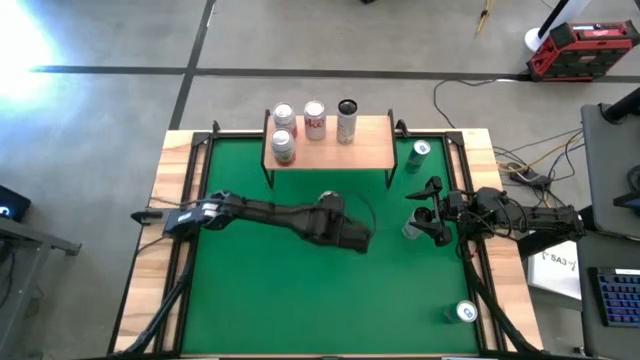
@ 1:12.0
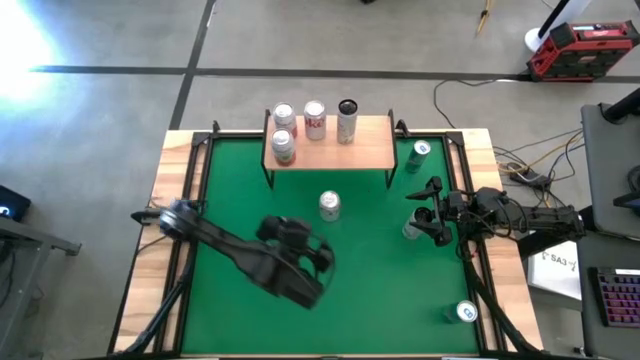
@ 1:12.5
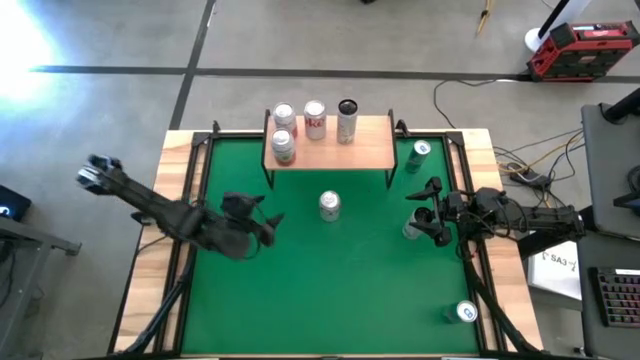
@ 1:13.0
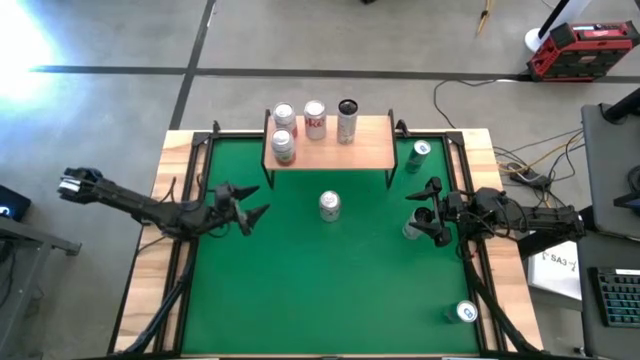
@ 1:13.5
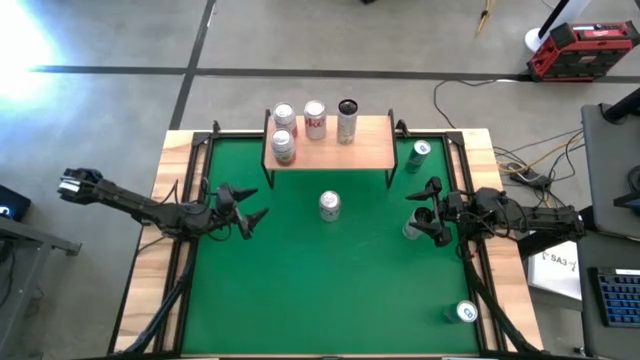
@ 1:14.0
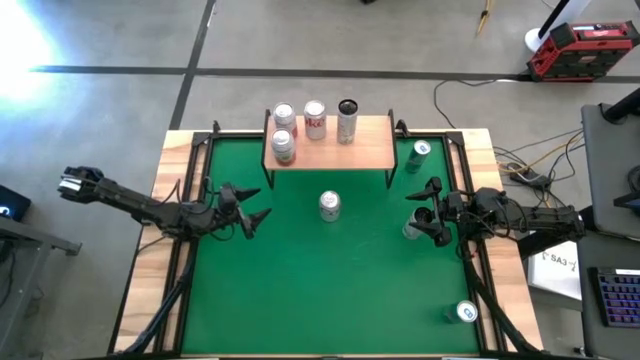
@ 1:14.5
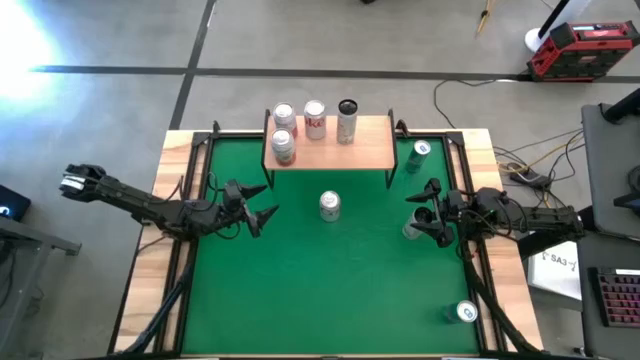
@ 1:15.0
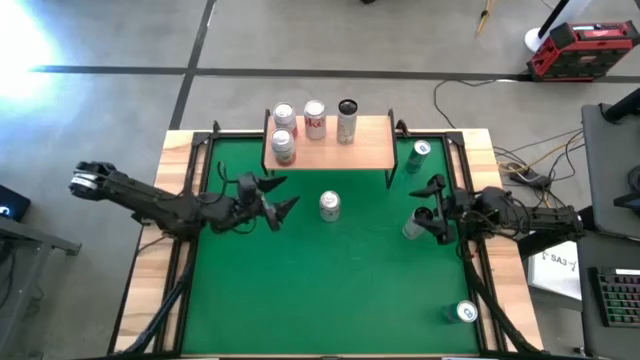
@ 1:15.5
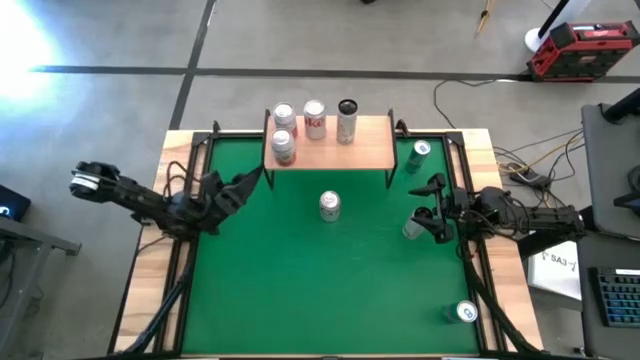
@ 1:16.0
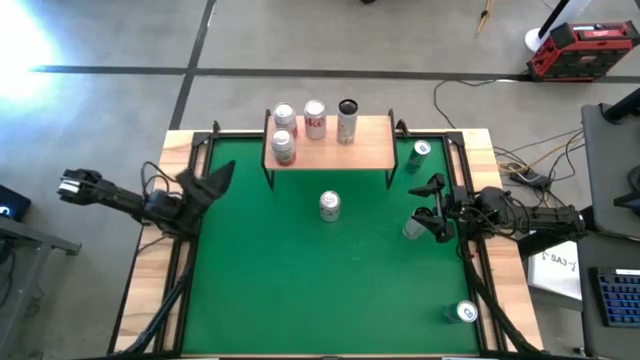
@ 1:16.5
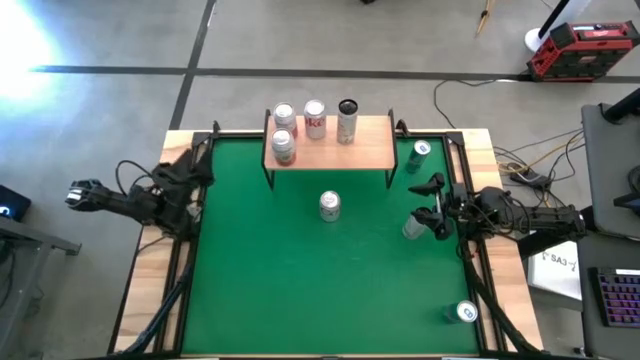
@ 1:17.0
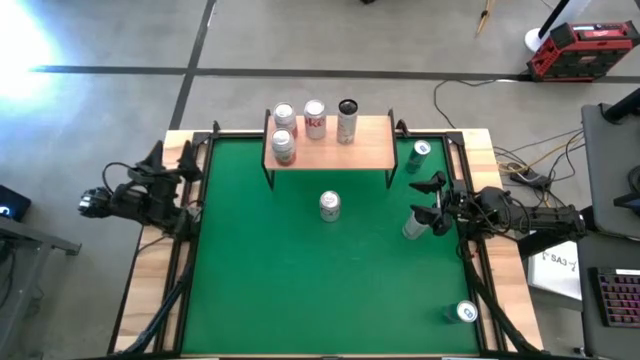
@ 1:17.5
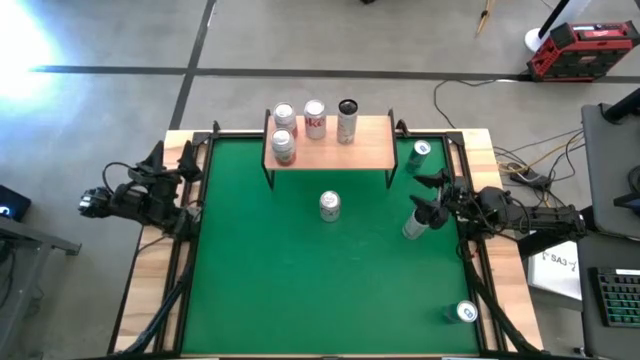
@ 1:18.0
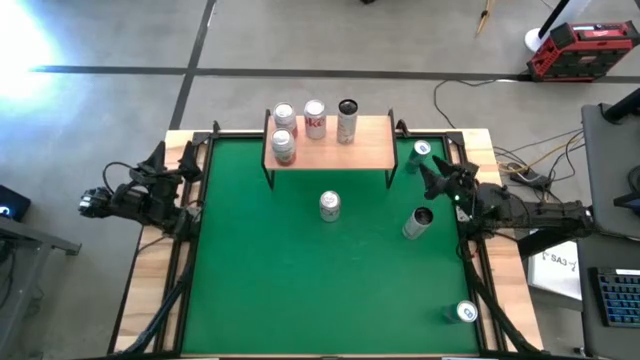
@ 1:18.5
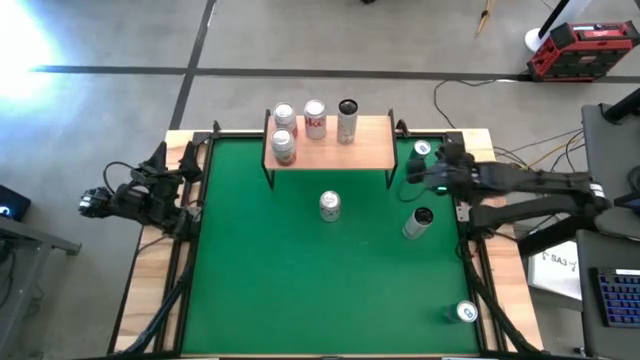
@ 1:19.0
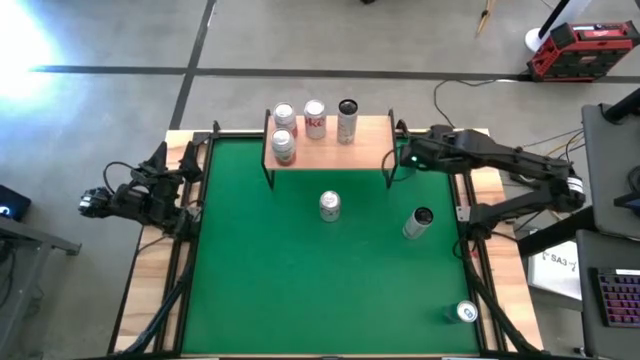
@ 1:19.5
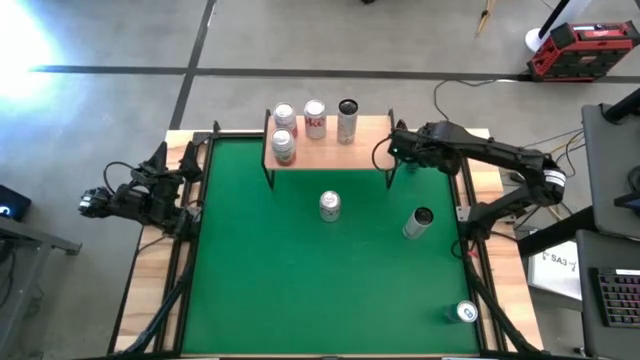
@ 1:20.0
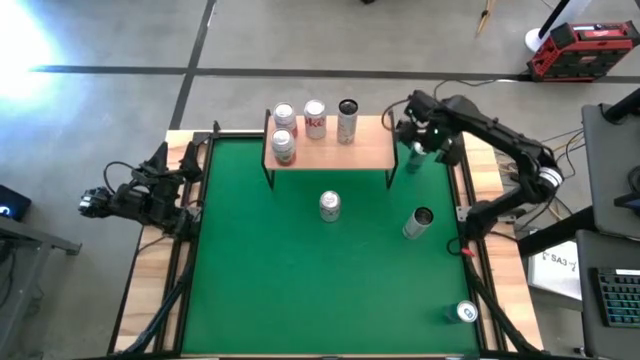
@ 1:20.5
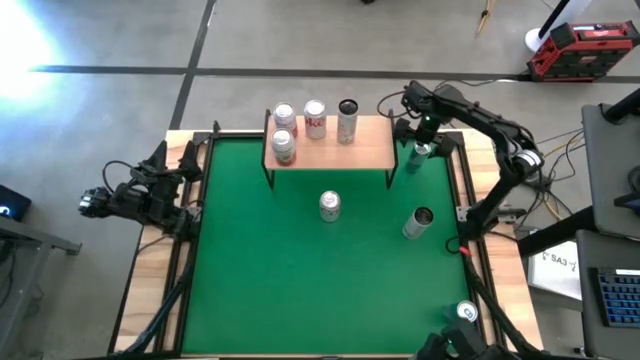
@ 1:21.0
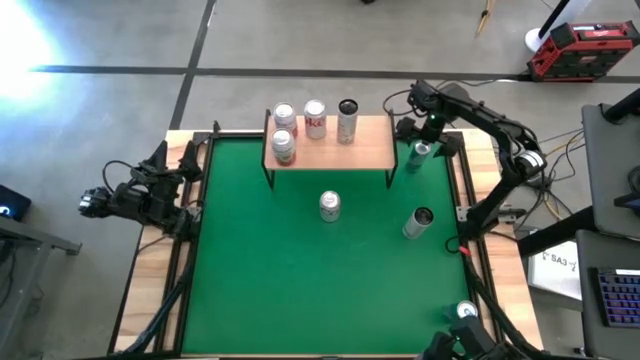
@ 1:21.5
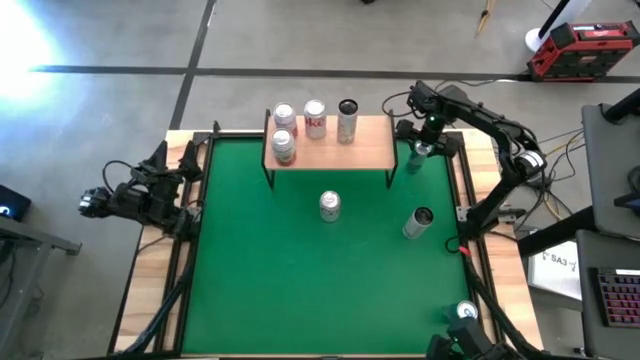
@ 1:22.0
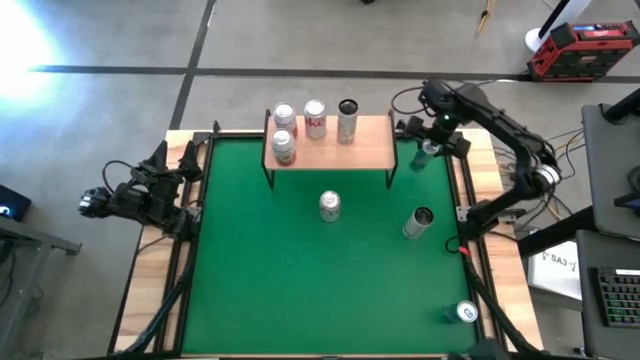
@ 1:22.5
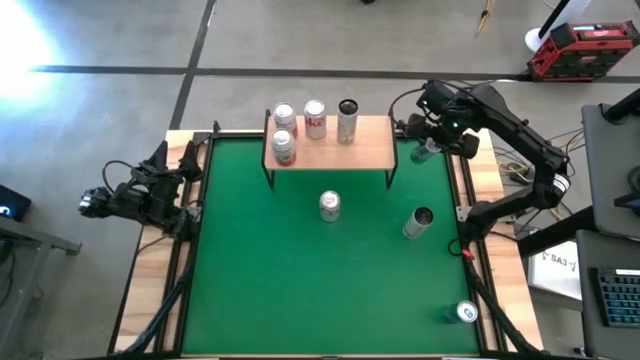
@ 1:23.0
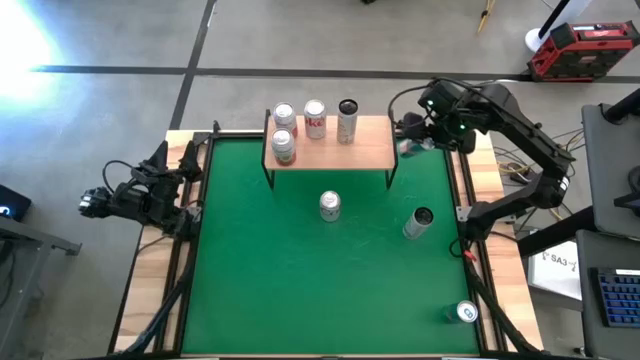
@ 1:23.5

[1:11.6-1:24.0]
Task: Place canned beverage on shelf
Put the top blue soda can on the shelf

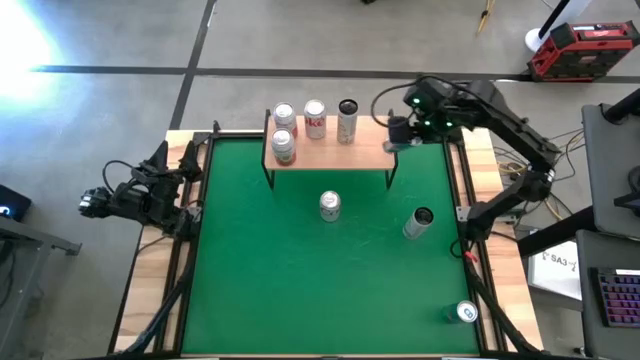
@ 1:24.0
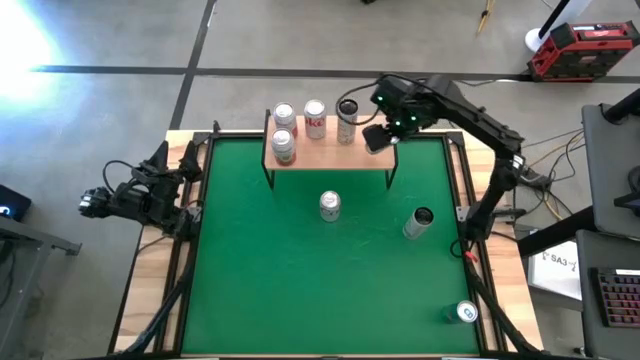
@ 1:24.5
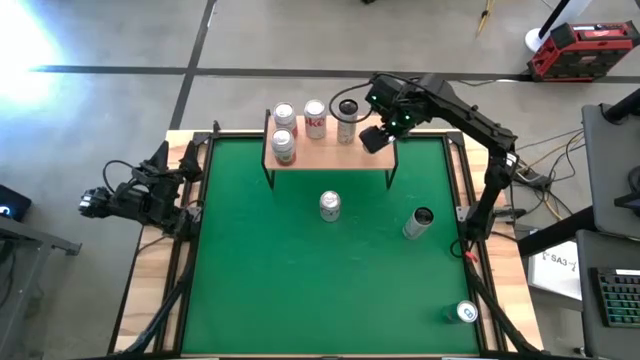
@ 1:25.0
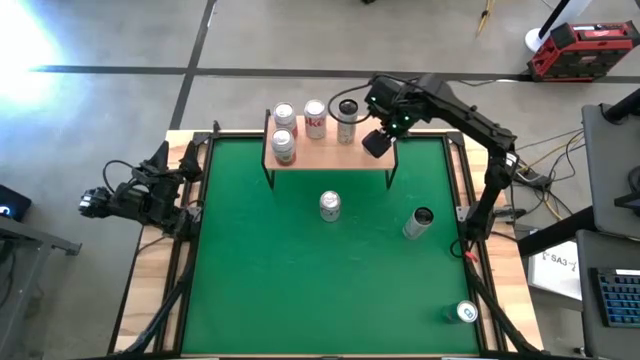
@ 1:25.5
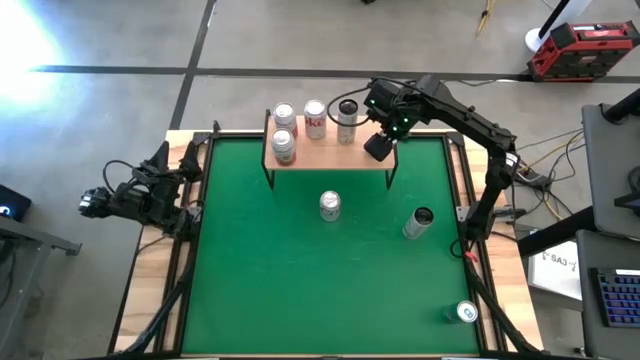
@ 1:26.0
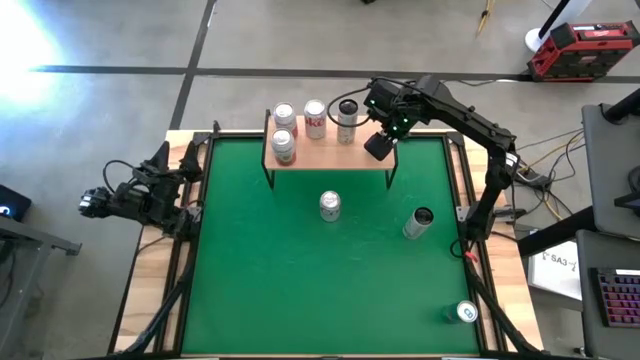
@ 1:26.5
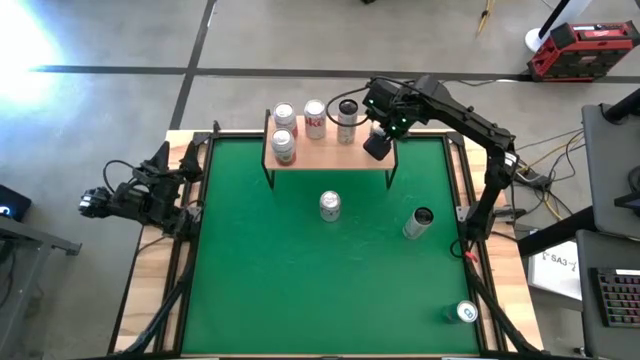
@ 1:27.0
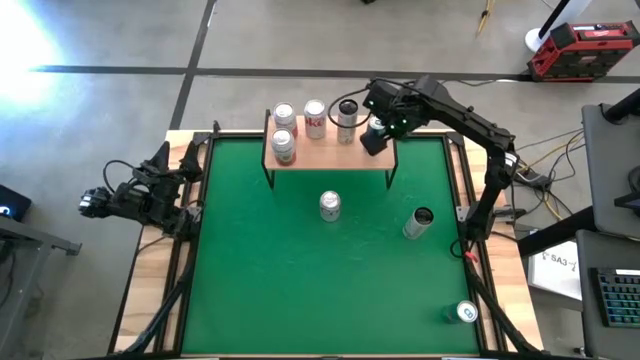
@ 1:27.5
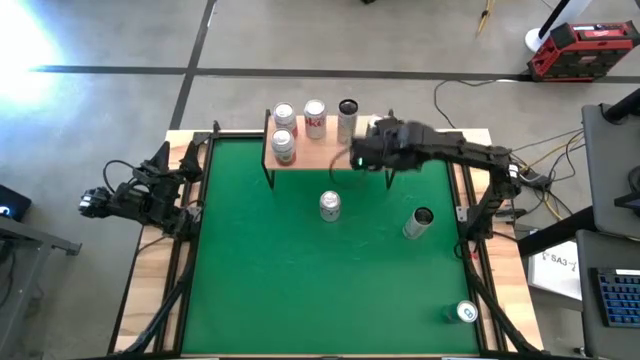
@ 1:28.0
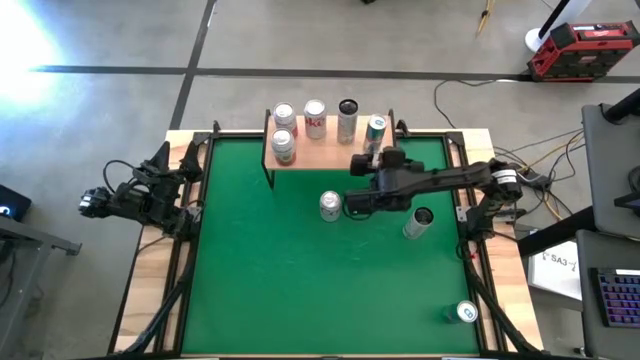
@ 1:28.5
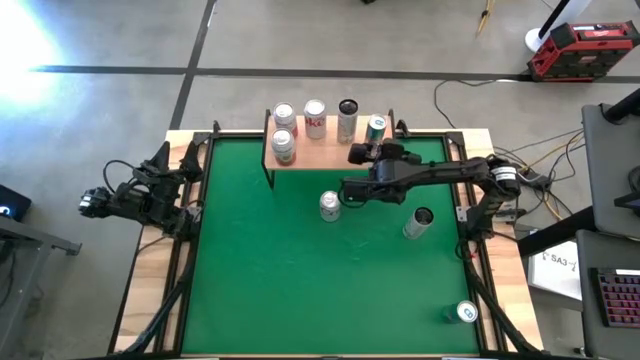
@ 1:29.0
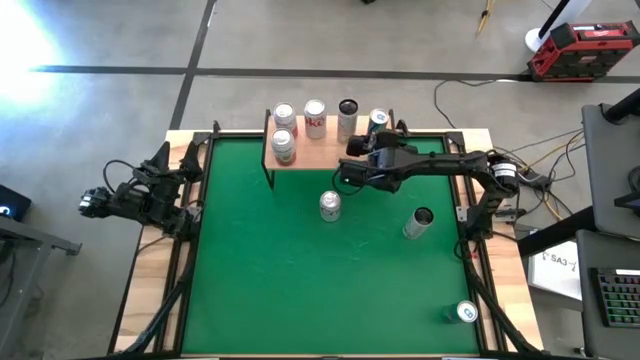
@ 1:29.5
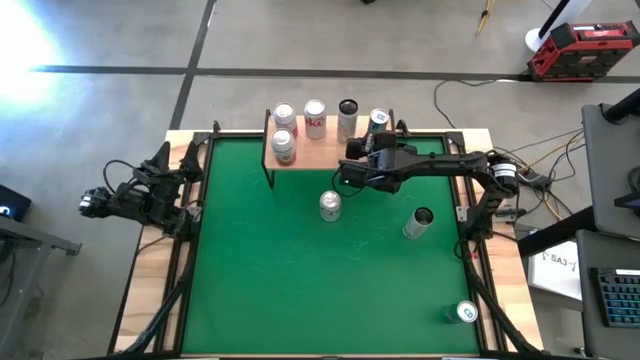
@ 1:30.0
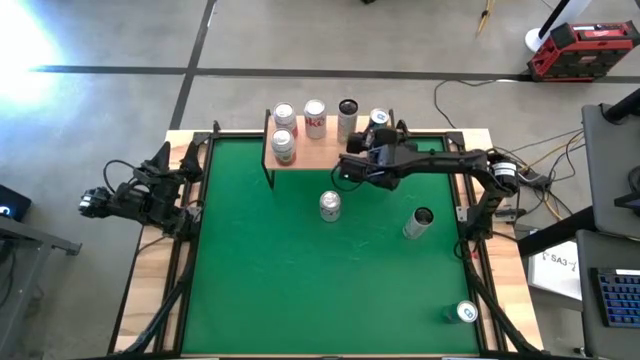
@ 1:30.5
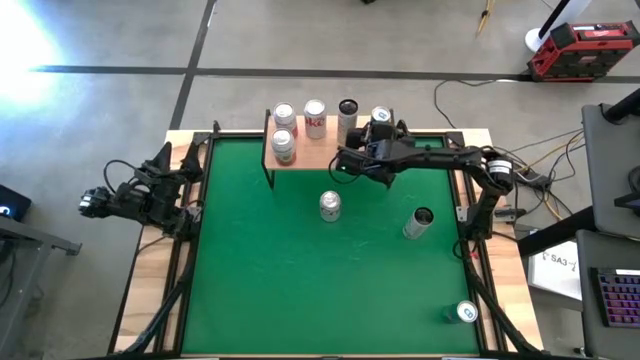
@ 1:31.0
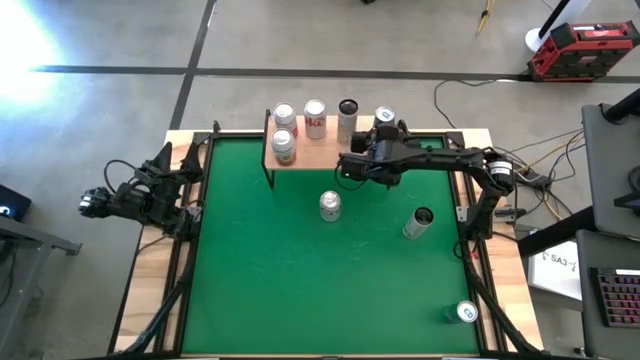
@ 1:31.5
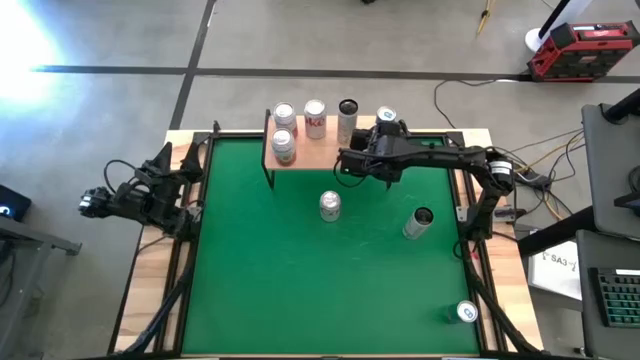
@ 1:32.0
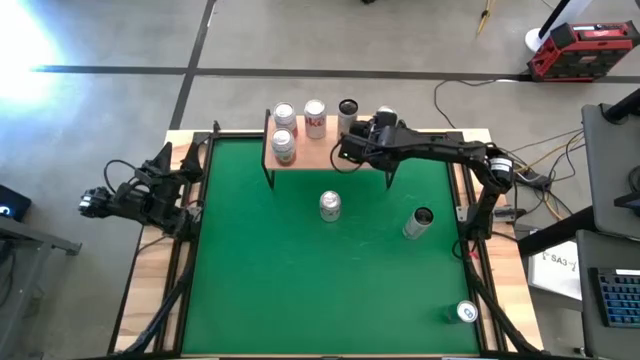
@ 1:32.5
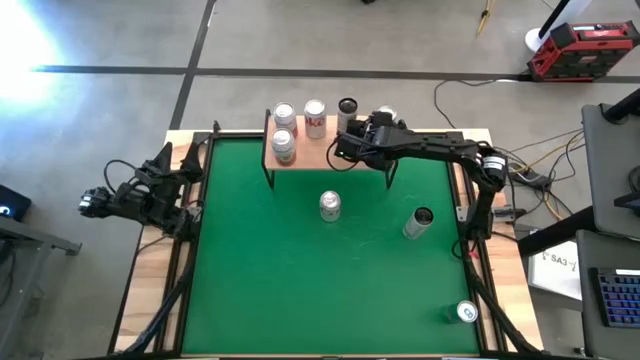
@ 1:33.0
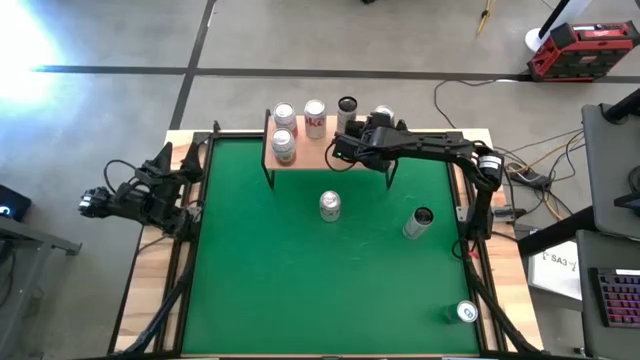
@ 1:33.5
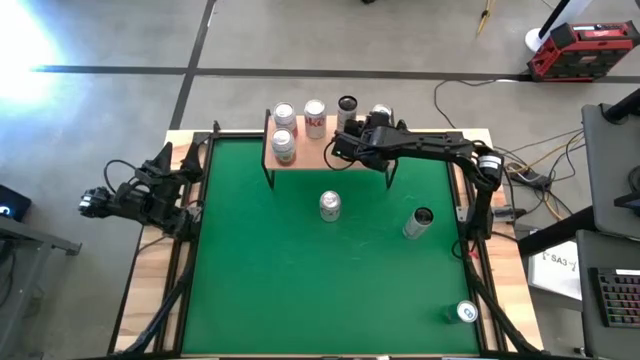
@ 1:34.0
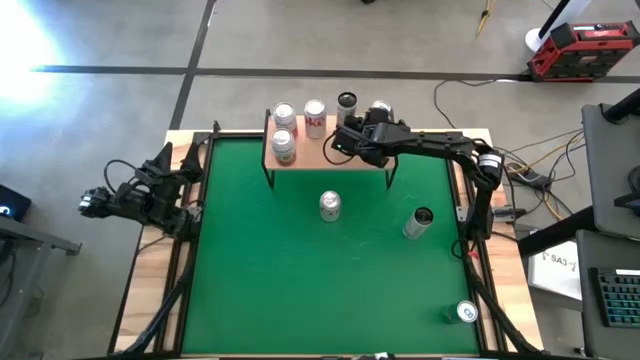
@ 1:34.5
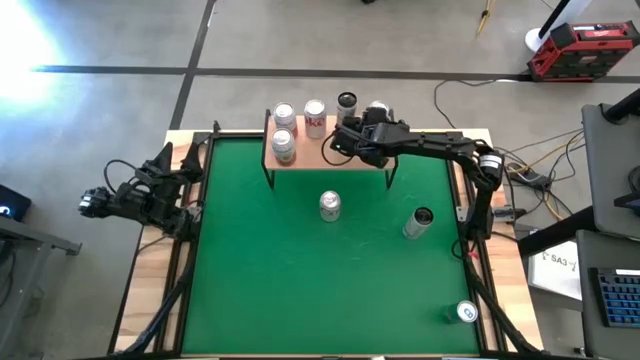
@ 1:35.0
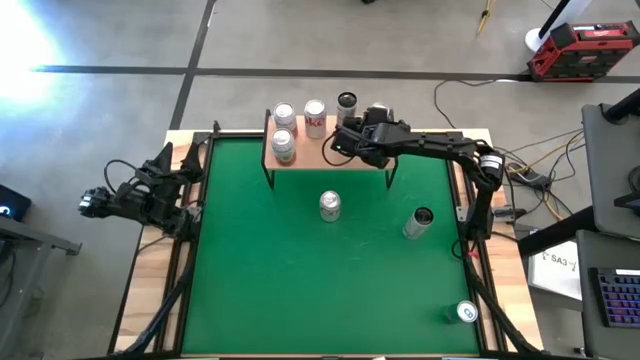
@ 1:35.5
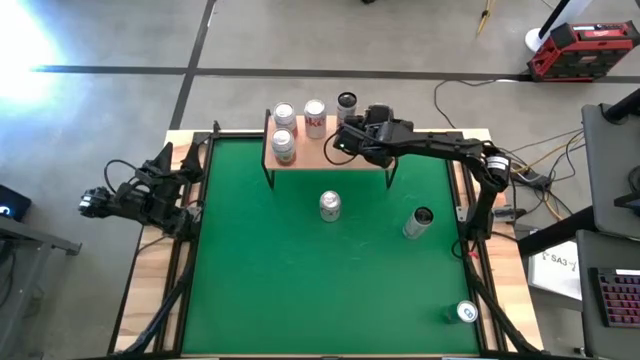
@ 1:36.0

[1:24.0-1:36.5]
Put the top blue soda can on the shelf
